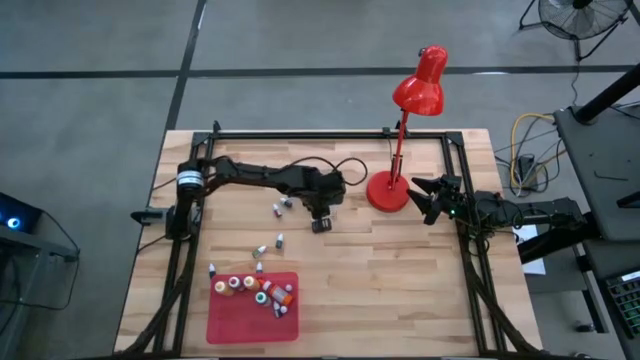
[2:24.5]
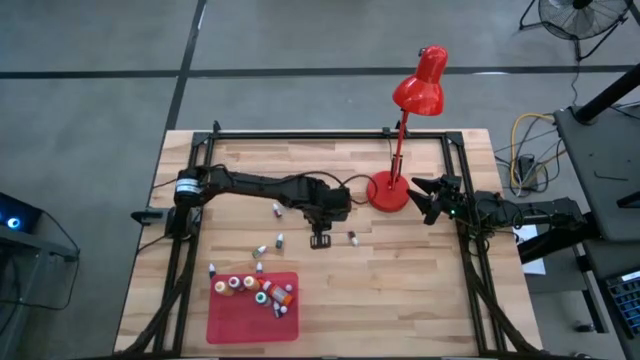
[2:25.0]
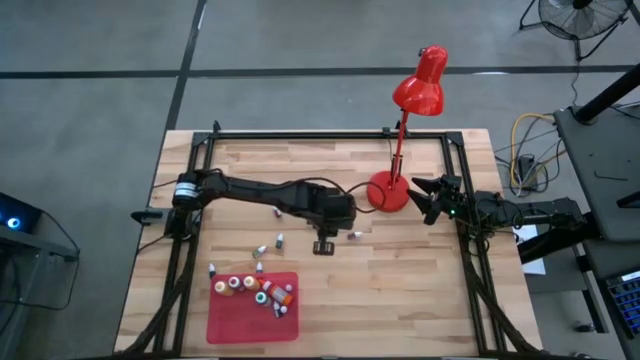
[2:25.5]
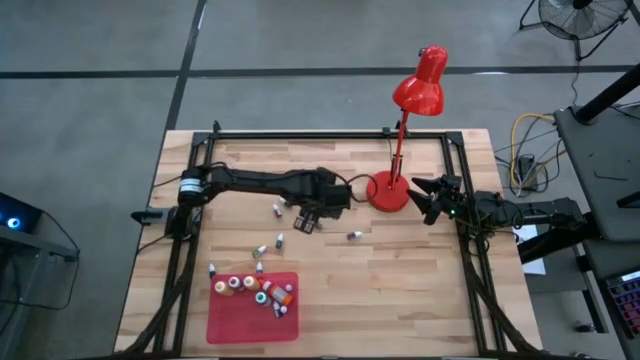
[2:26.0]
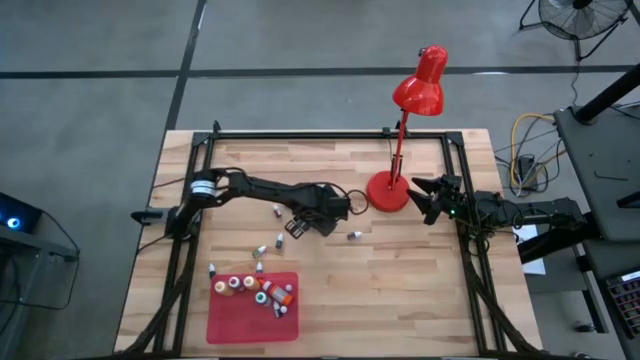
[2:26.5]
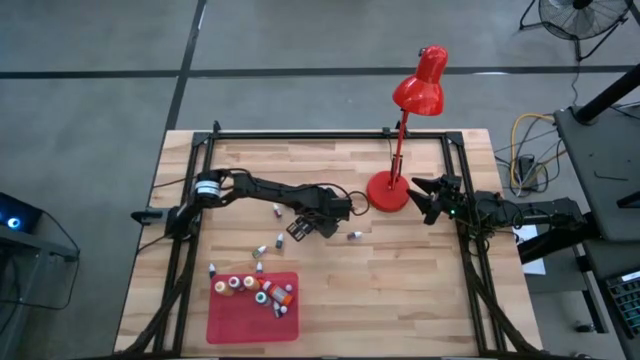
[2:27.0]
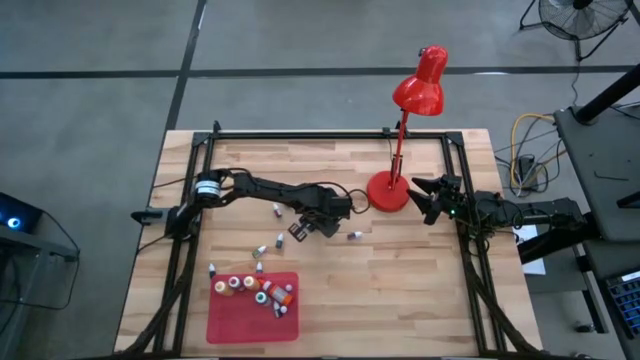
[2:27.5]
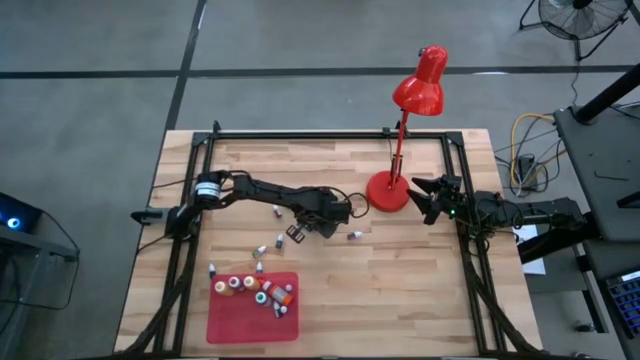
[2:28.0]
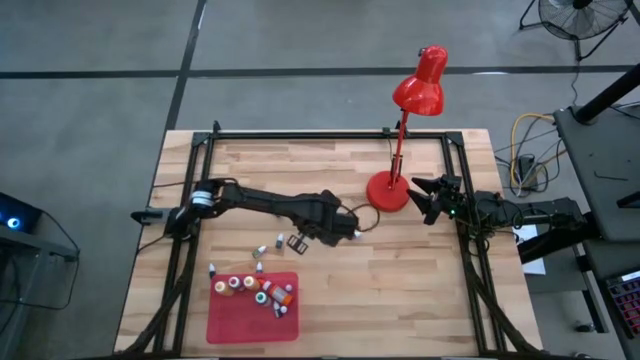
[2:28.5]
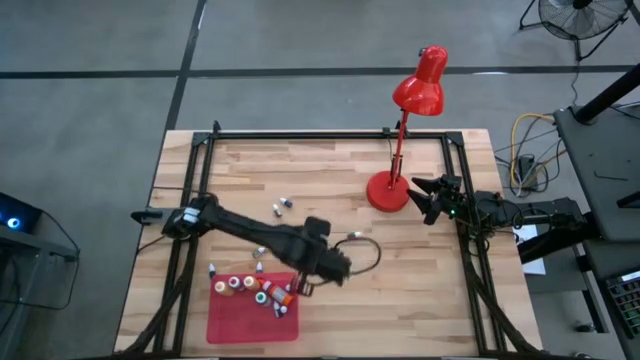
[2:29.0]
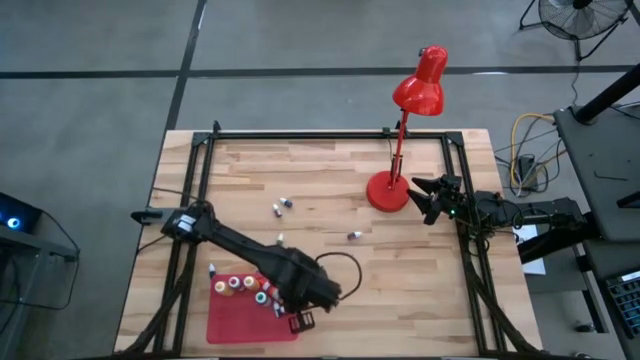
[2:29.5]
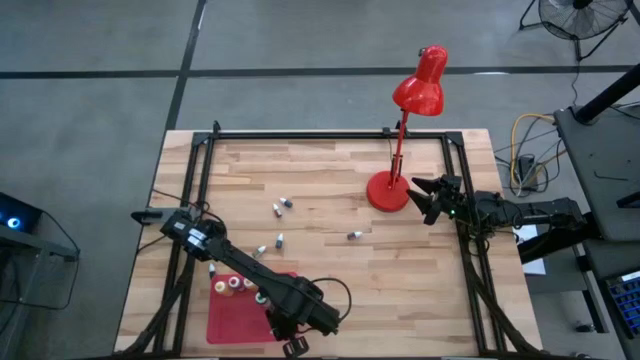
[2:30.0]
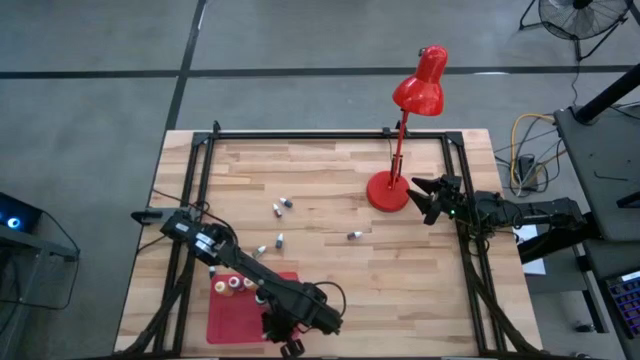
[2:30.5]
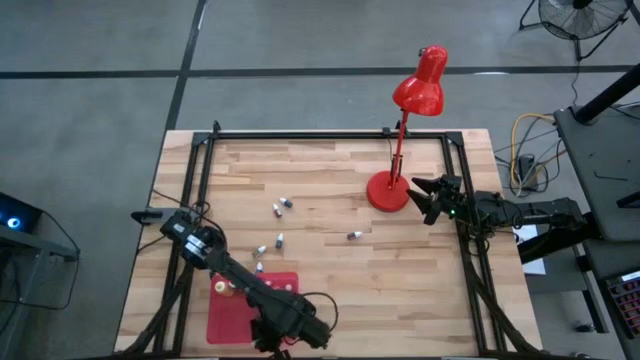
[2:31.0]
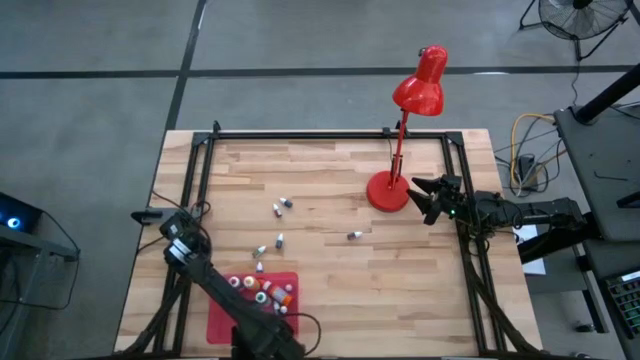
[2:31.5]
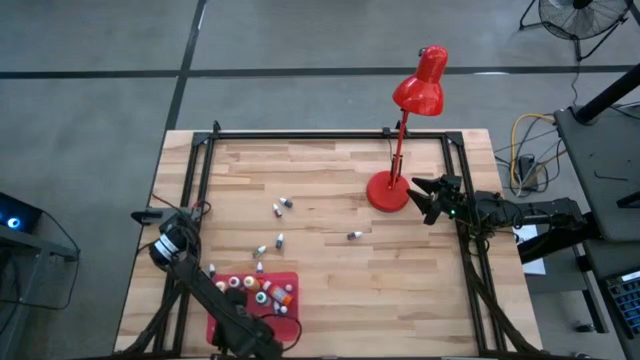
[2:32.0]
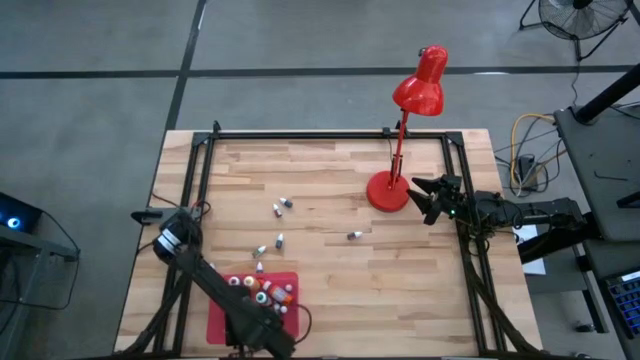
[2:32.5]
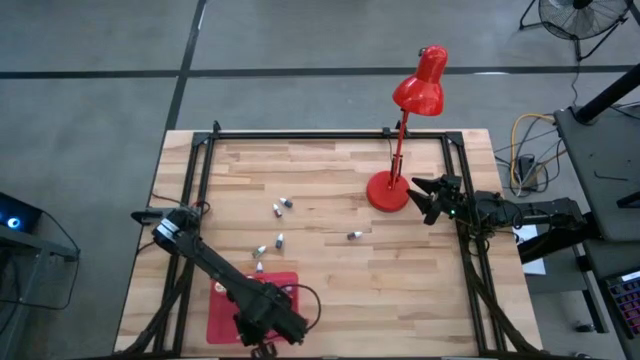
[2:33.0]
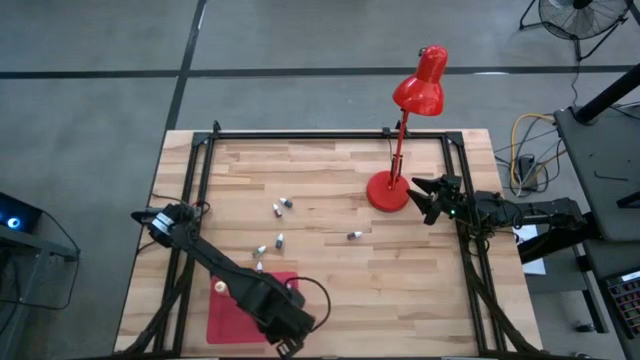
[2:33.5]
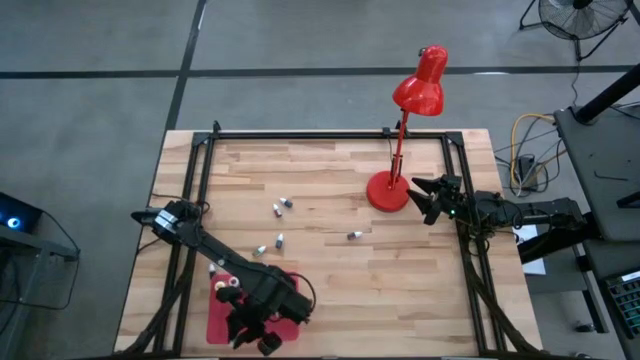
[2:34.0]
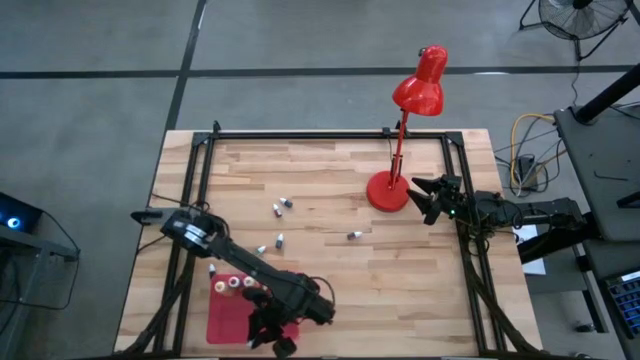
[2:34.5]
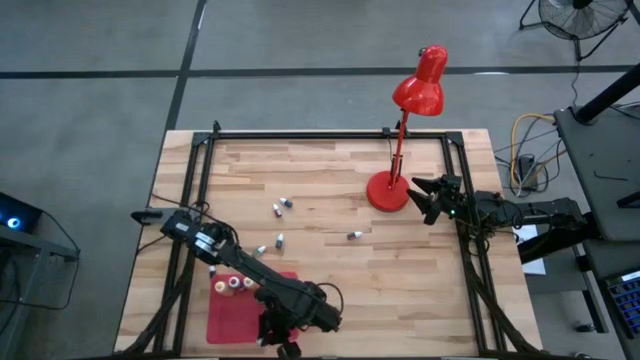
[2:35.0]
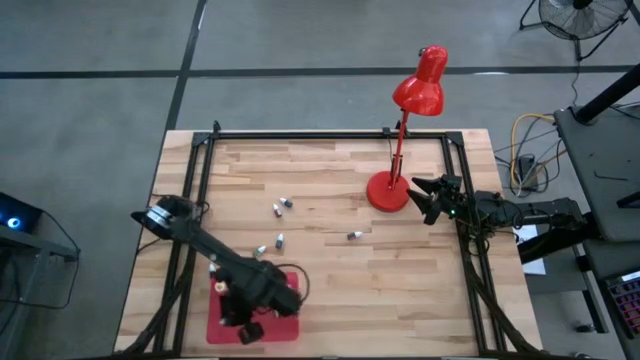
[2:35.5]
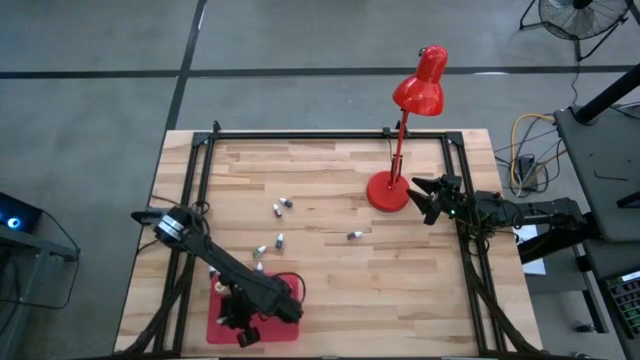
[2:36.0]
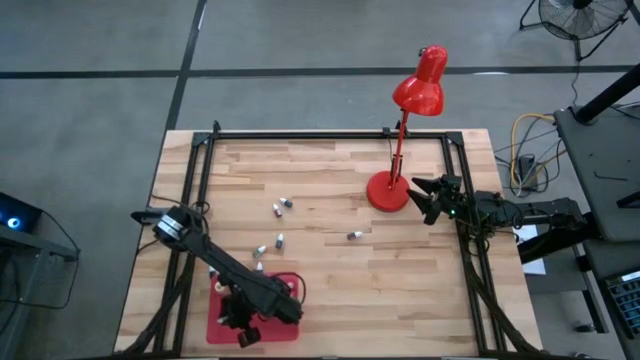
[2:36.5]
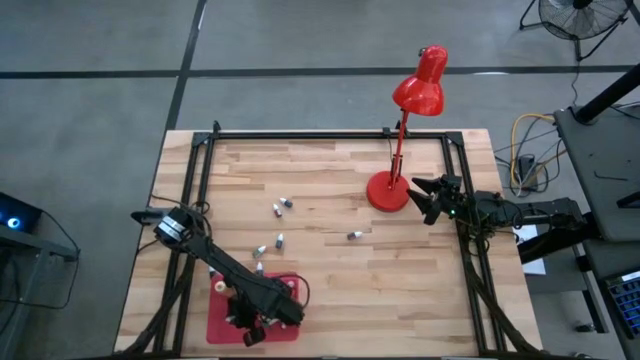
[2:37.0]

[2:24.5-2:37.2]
Task: Pick & Place food coloring
Put the small blue food coloring bottle into the red bin

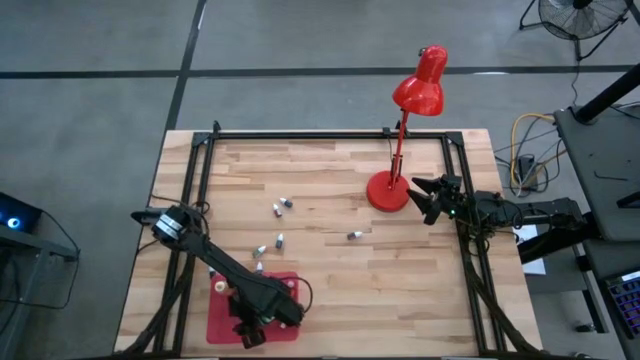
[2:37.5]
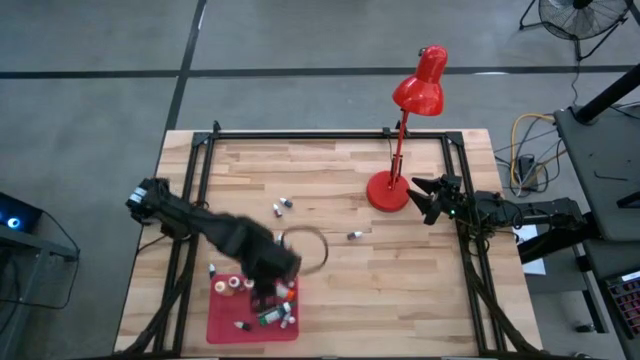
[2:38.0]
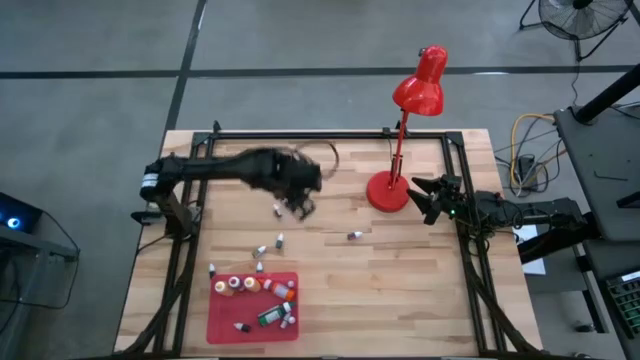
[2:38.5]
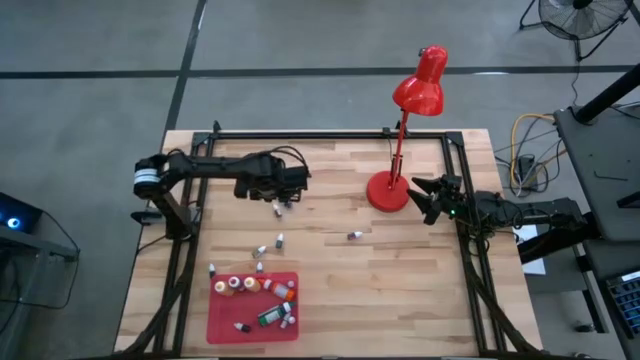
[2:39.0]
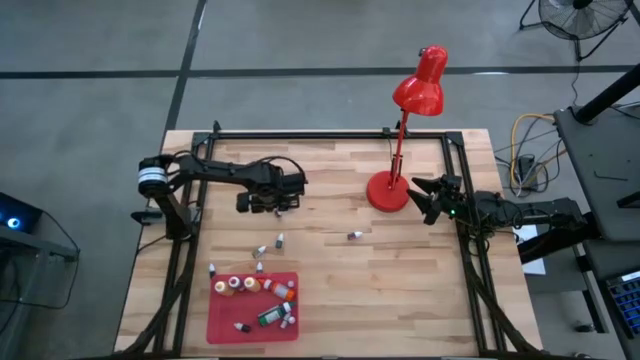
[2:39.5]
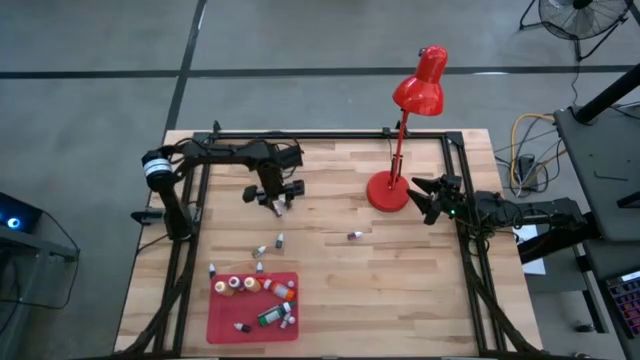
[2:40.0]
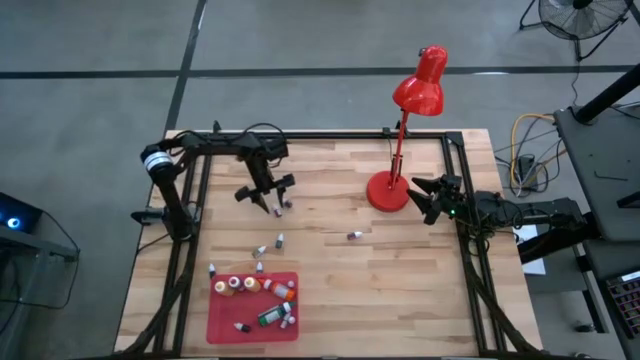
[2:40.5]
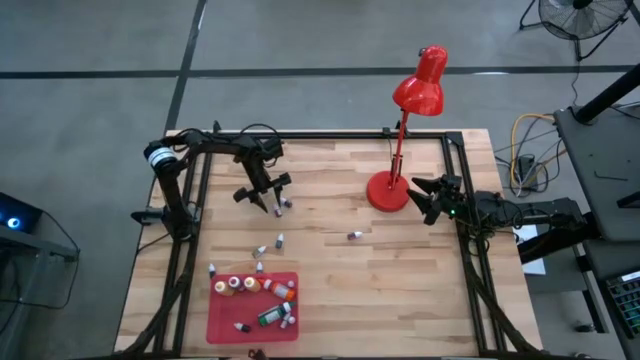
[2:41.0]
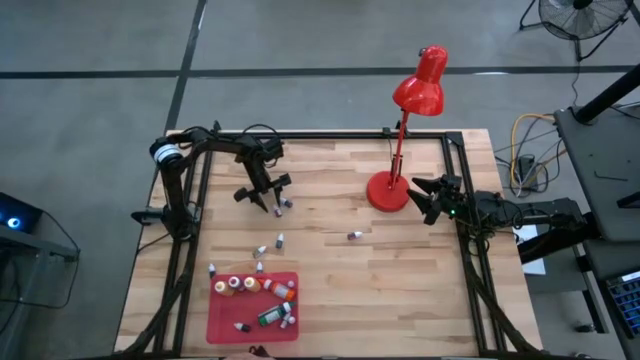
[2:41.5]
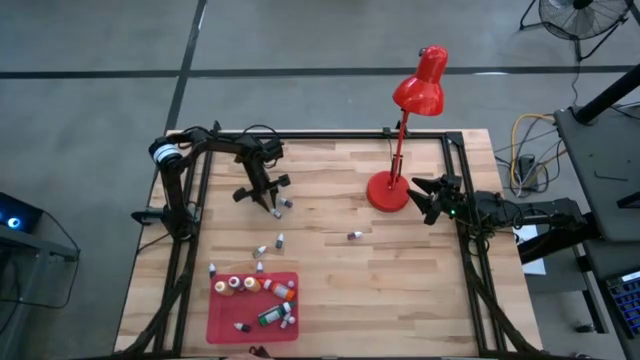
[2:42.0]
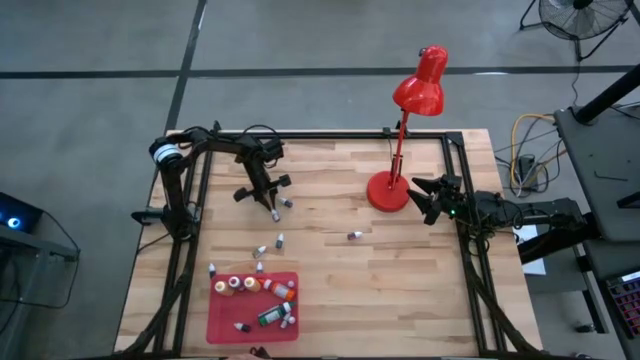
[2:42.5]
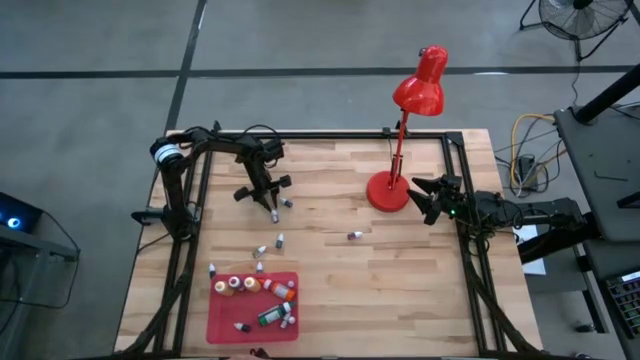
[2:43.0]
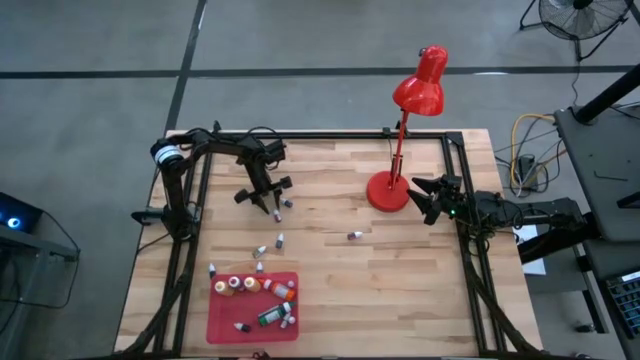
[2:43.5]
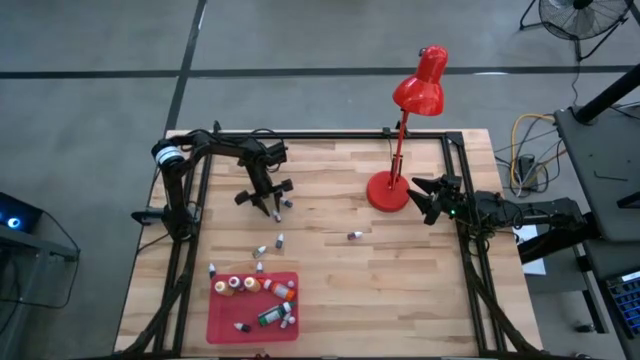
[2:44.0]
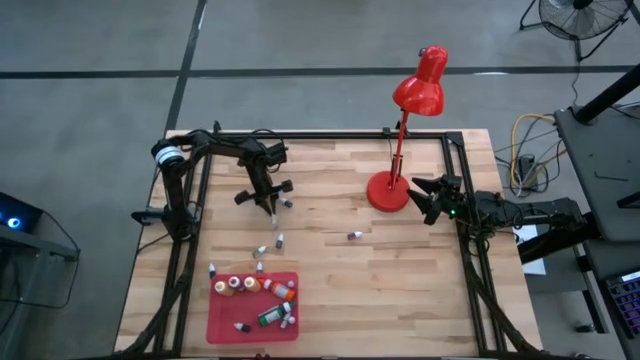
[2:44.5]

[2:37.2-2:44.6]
Put the small red food coloring bottle into the red bin

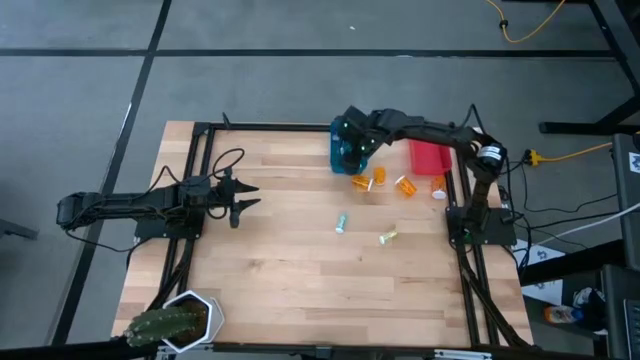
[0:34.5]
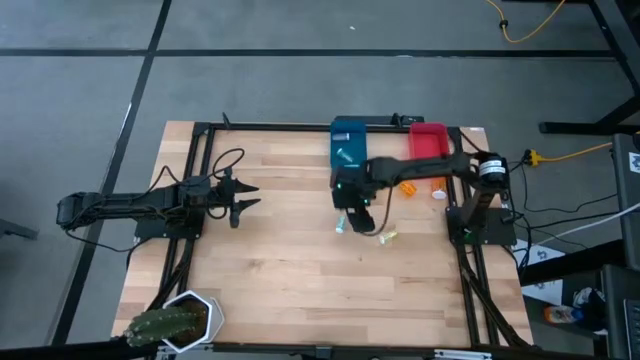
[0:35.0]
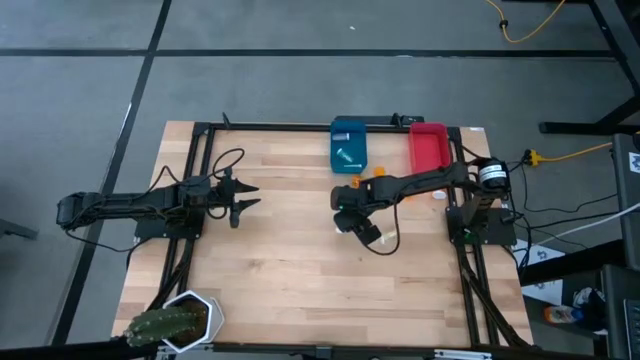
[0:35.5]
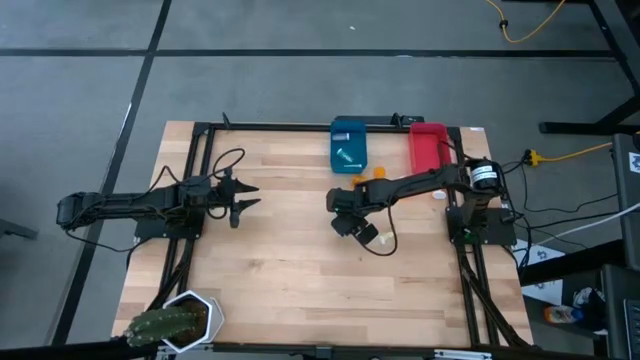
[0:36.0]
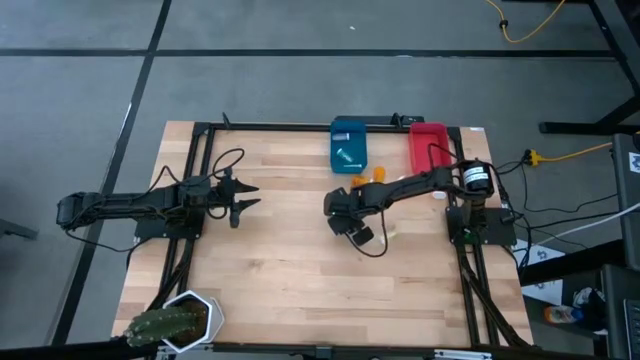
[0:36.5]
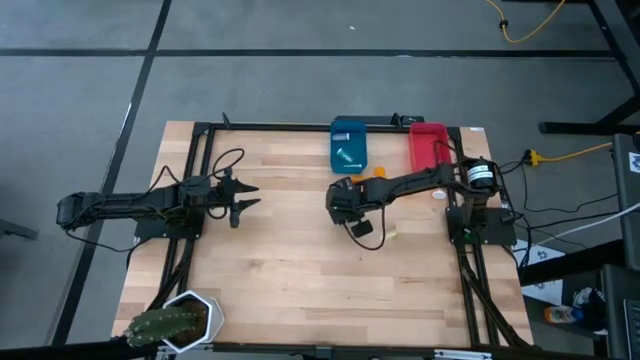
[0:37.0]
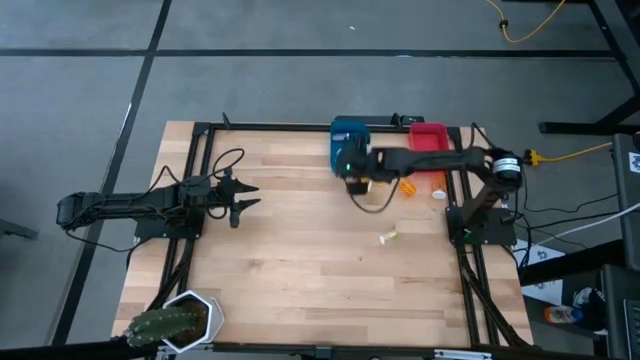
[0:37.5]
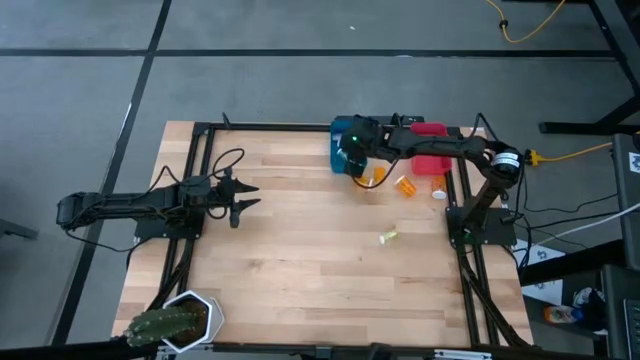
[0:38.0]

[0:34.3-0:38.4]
Task: Pick and place medicine bottles into bin by pill shape (circle, oval)
Put the small blue pill bottle into the blue bin
